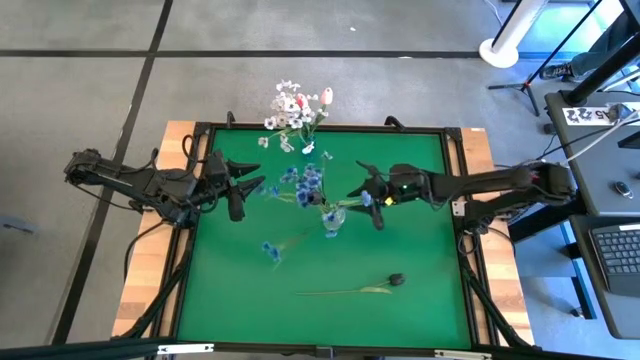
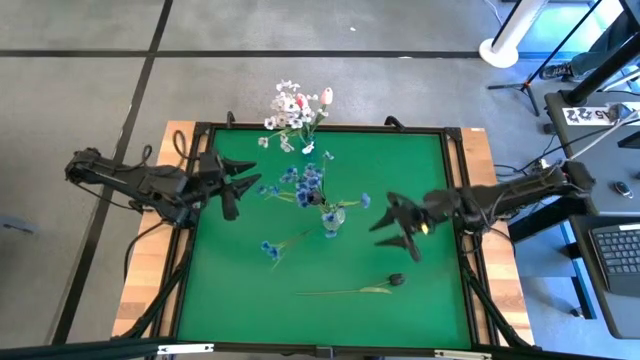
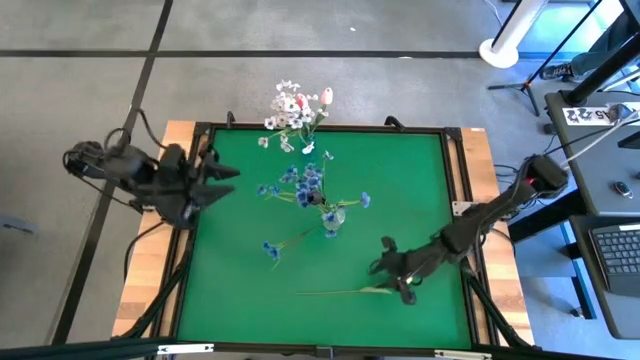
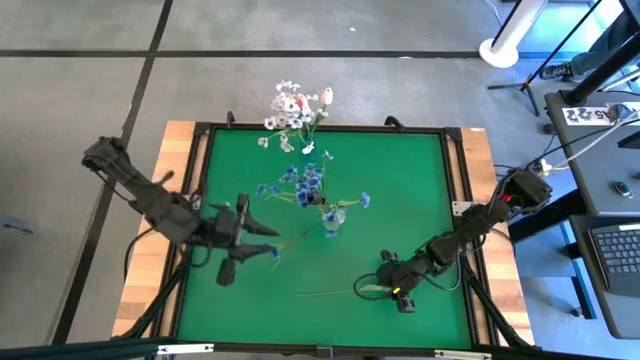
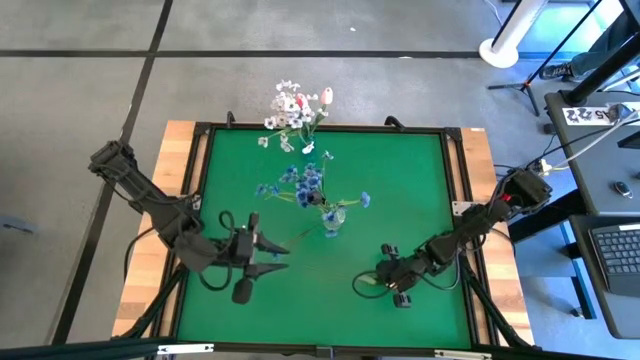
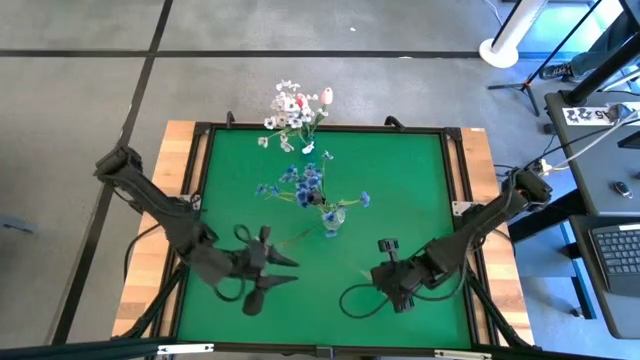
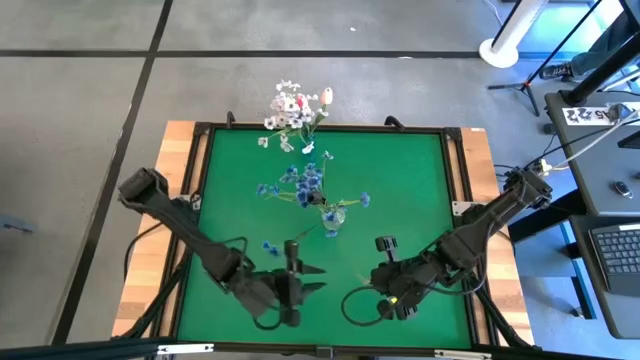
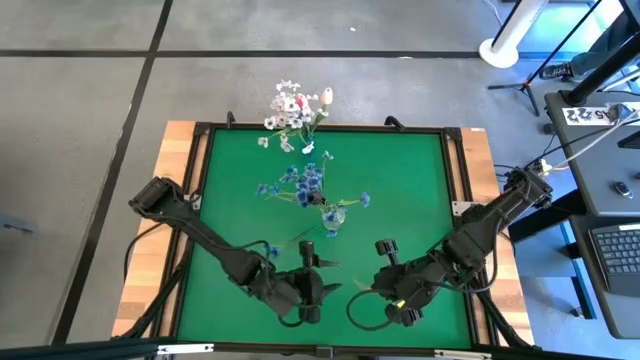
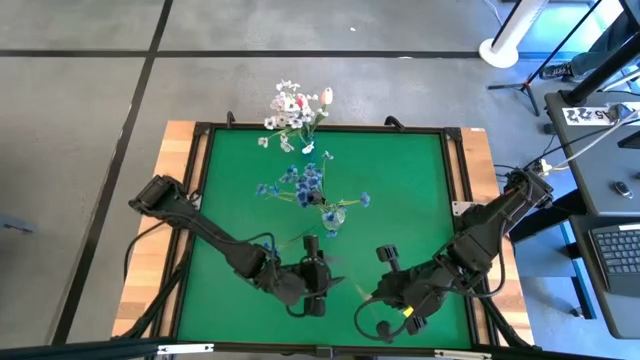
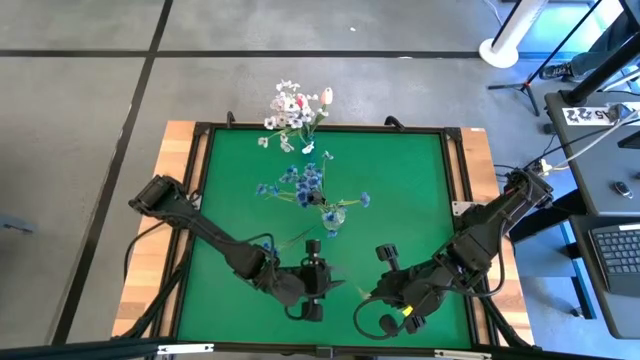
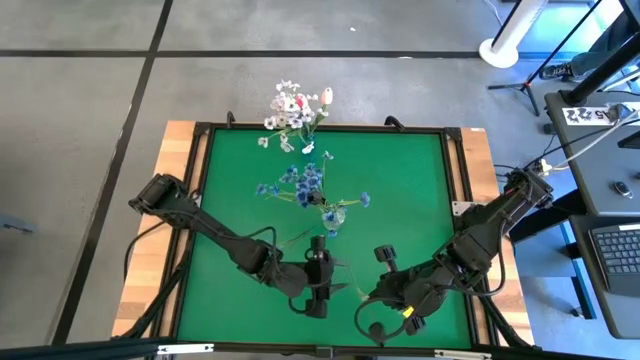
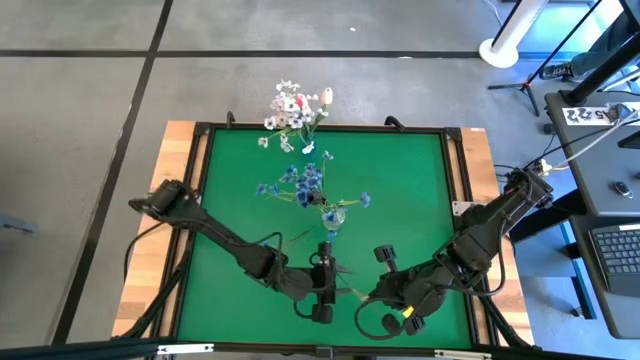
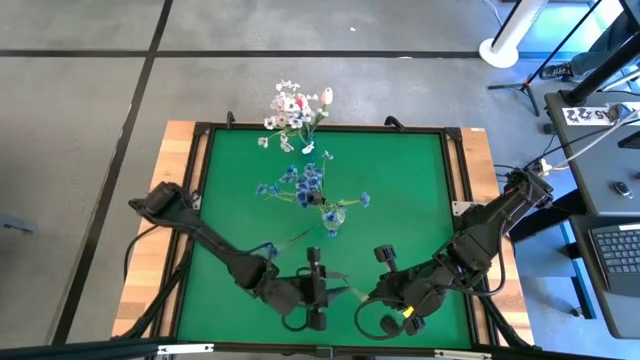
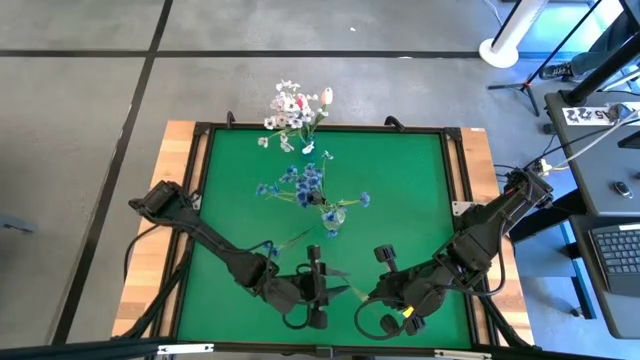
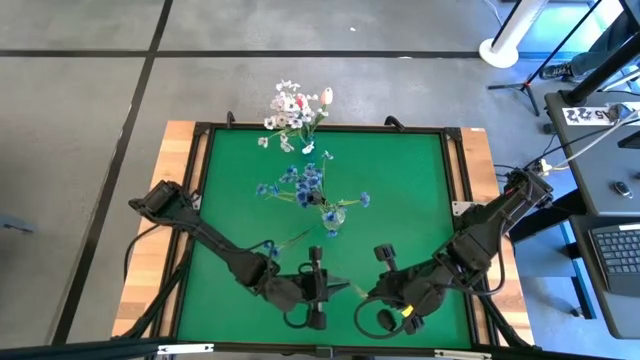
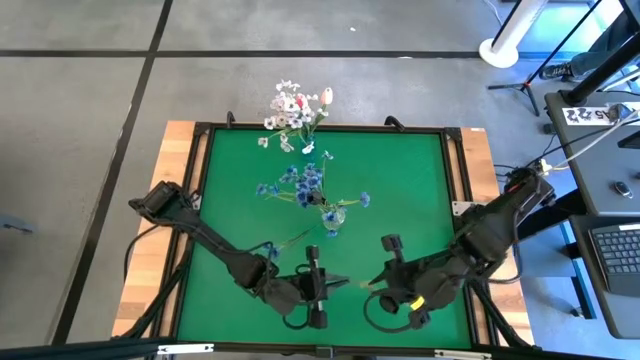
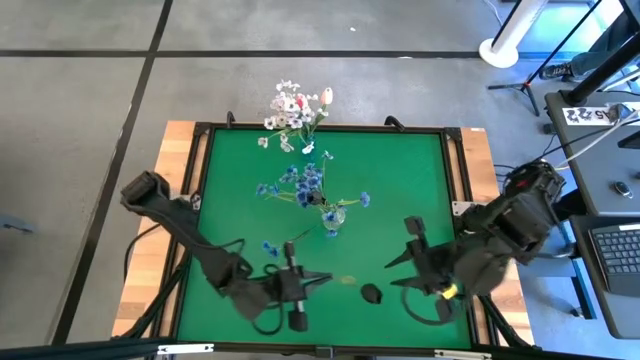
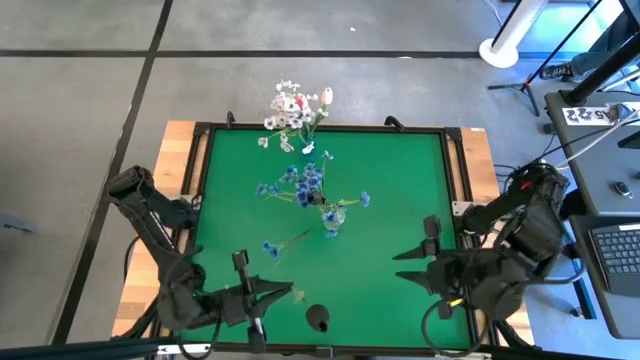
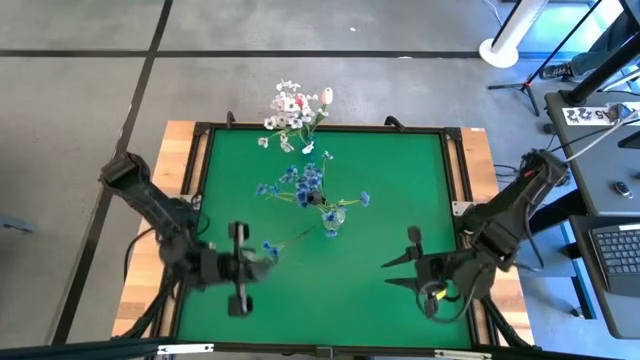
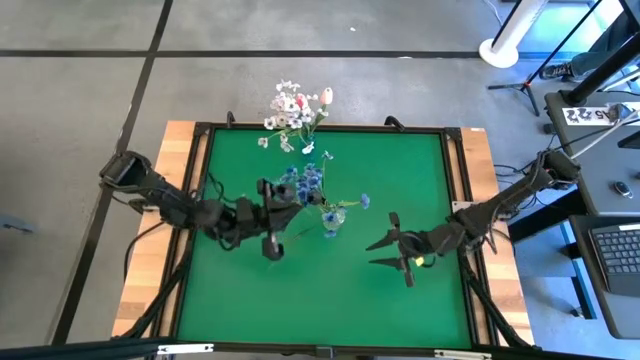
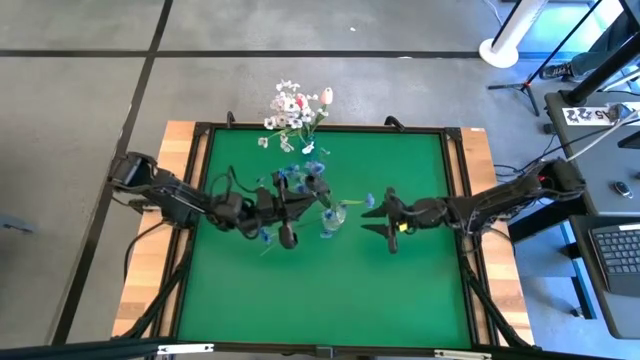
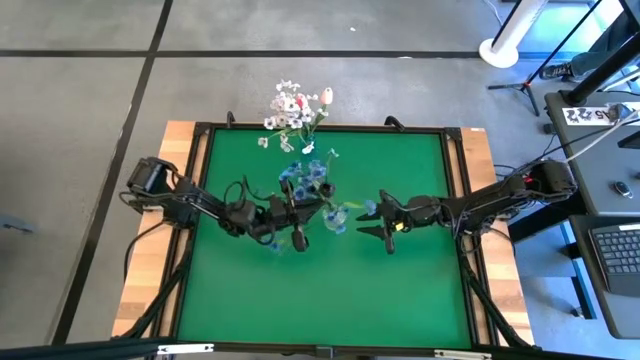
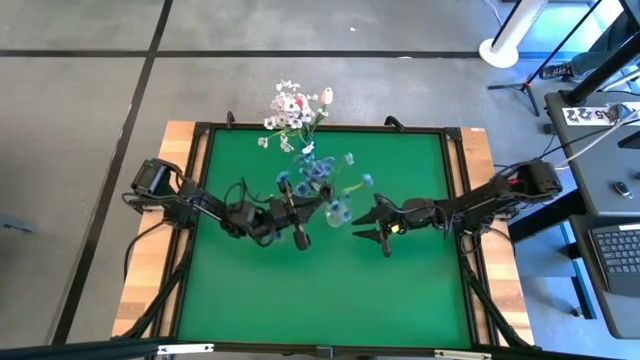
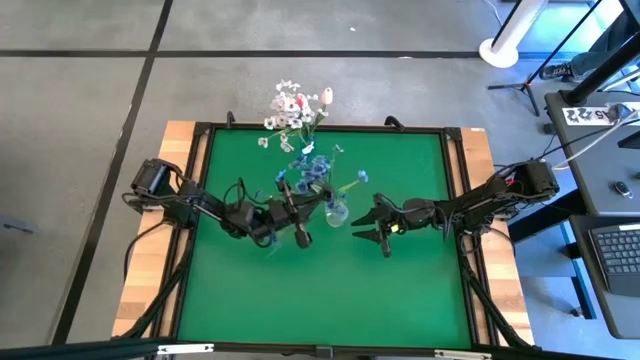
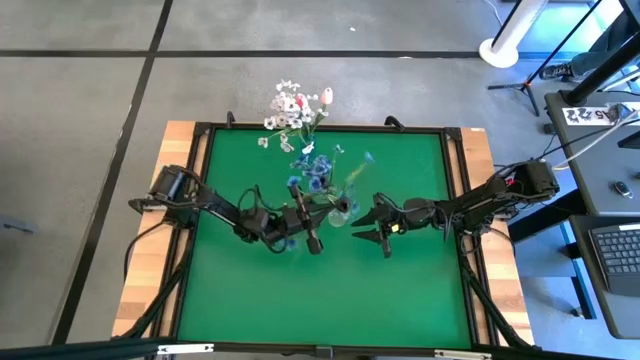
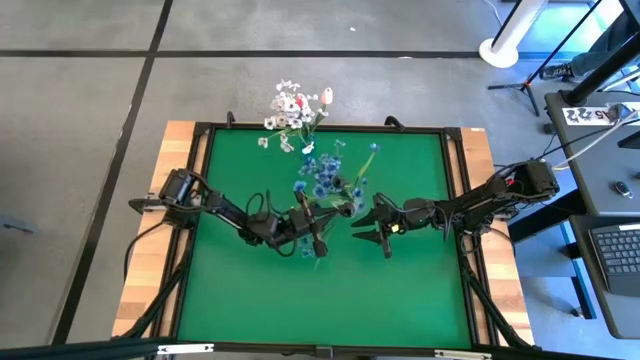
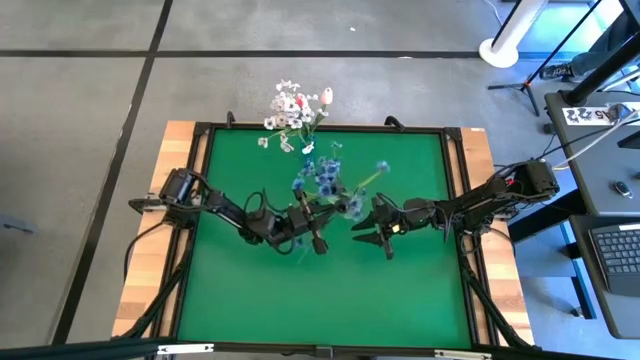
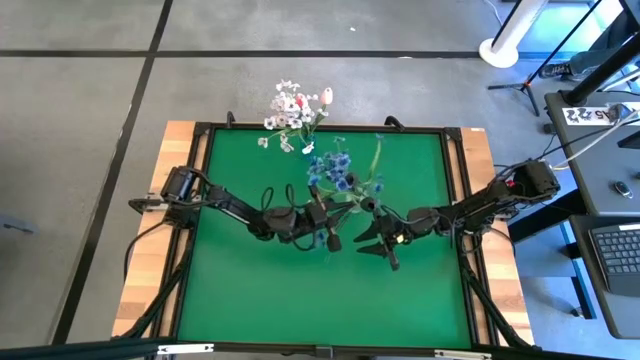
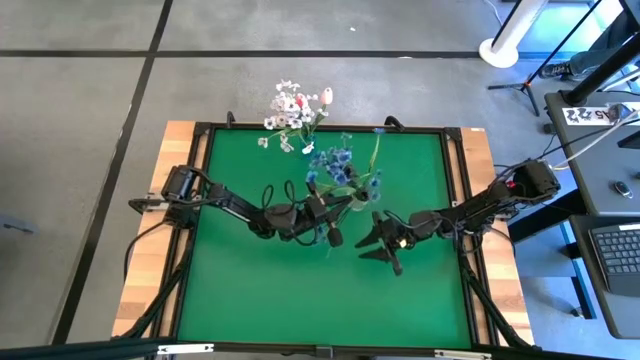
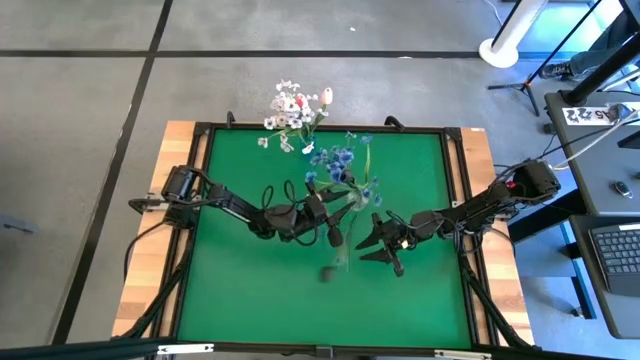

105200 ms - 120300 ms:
Task: Sort flowers into vase by color
Put the black flower into the transparent vase

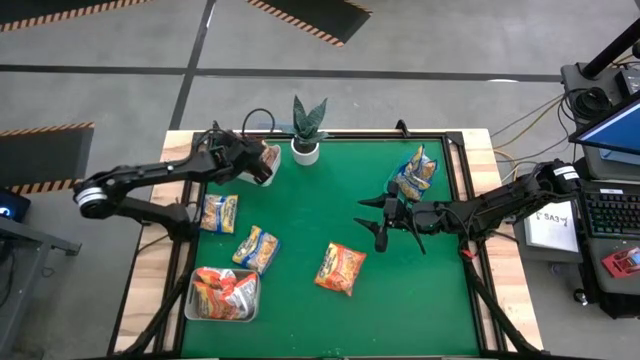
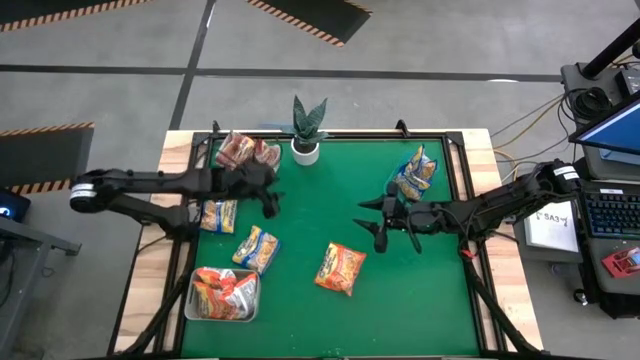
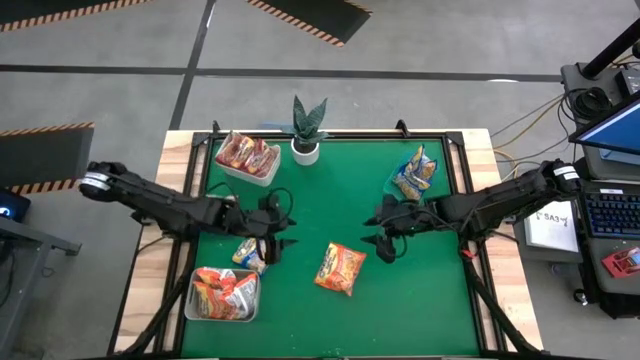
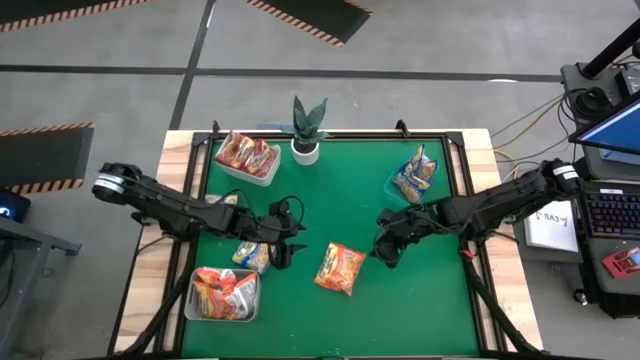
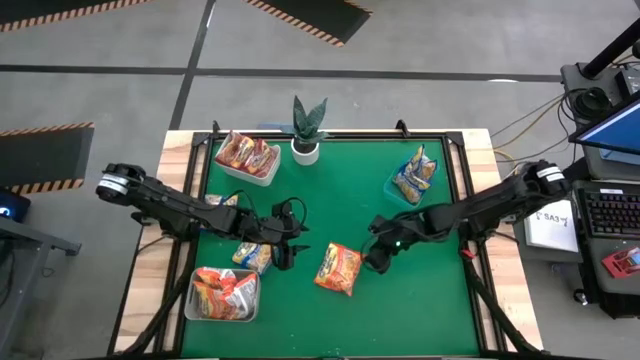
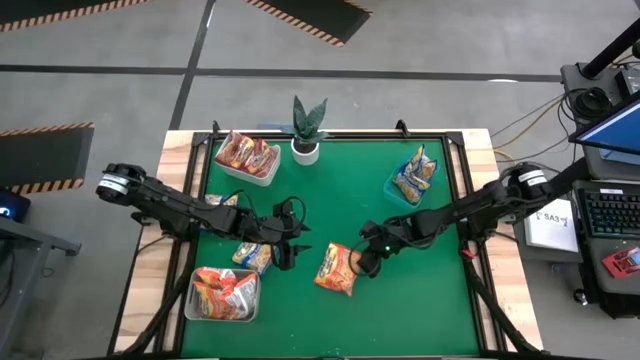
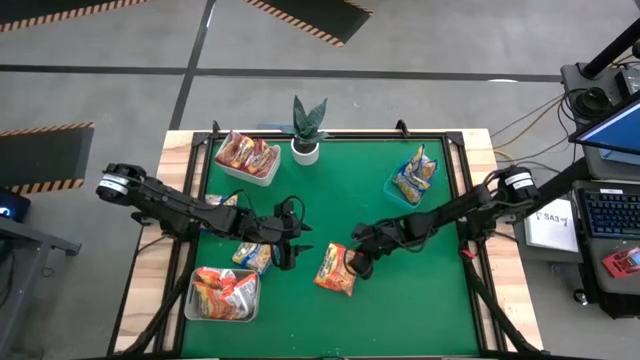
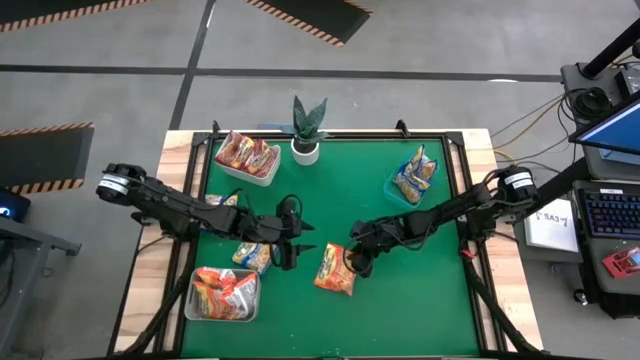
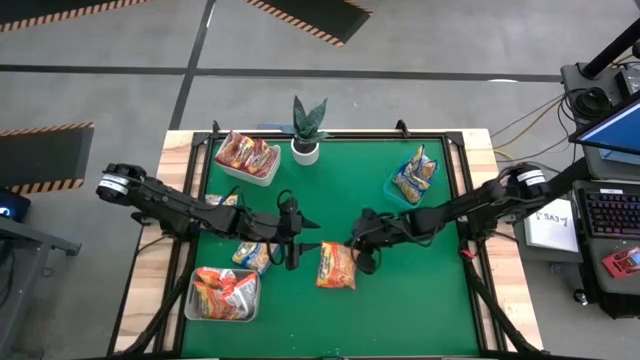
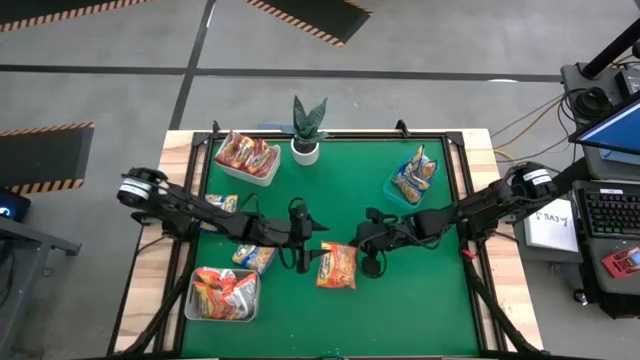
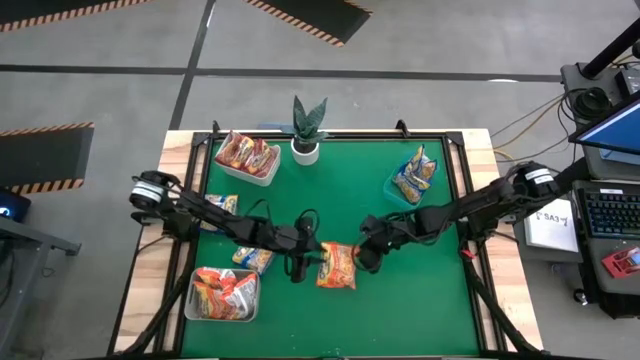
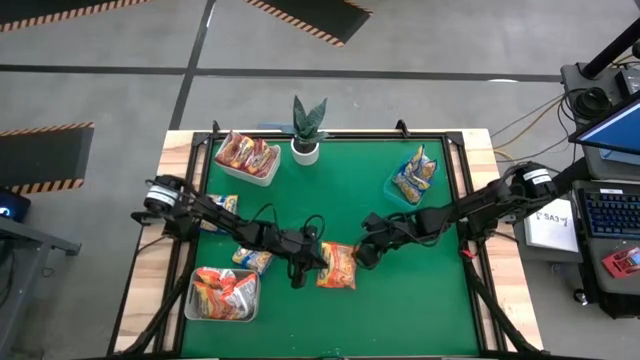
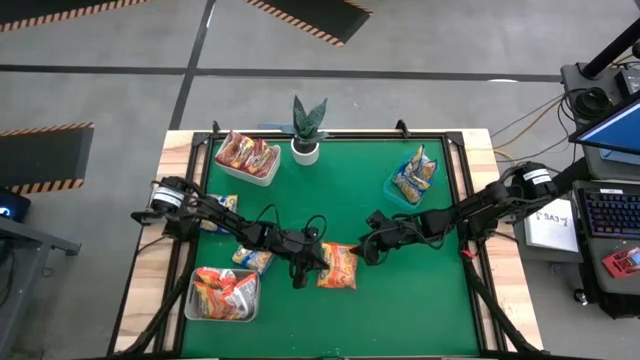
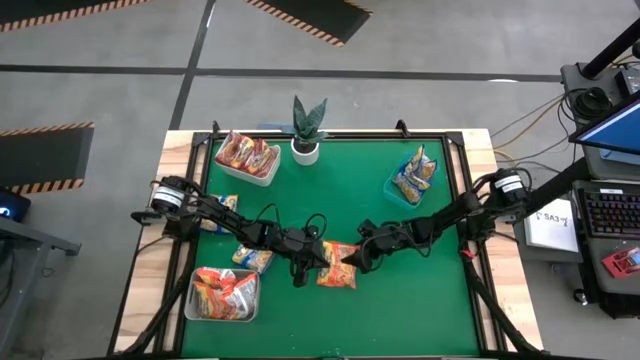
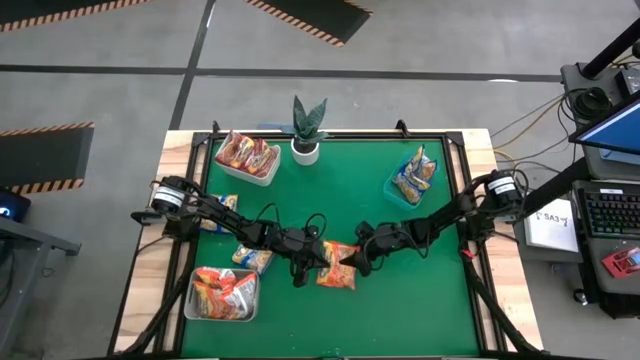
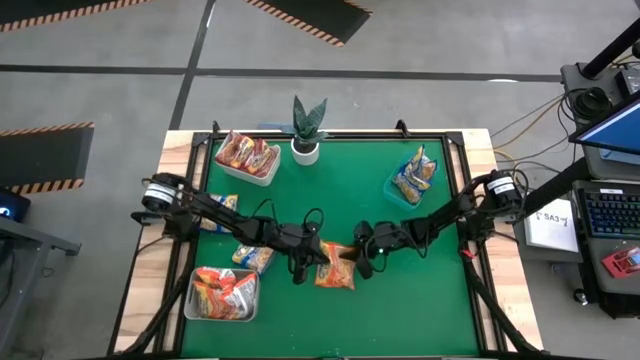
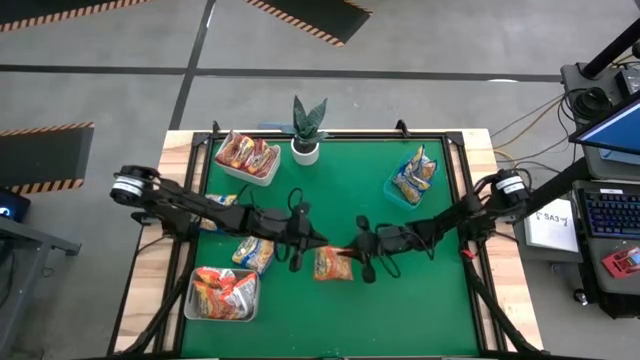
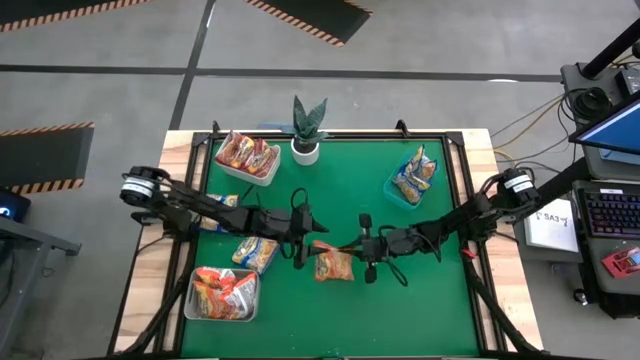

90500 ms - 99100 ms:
Task: Sort Maruchan noodles
Put the orange noodle pack into the gray bin
